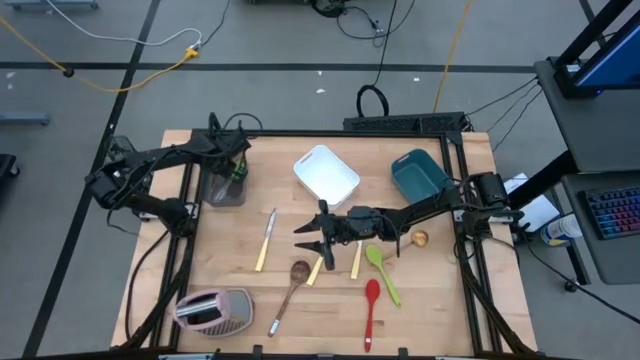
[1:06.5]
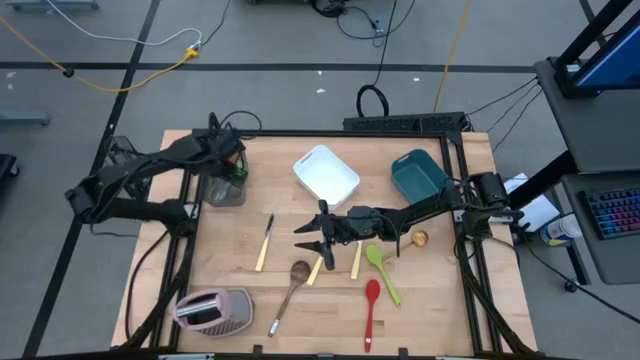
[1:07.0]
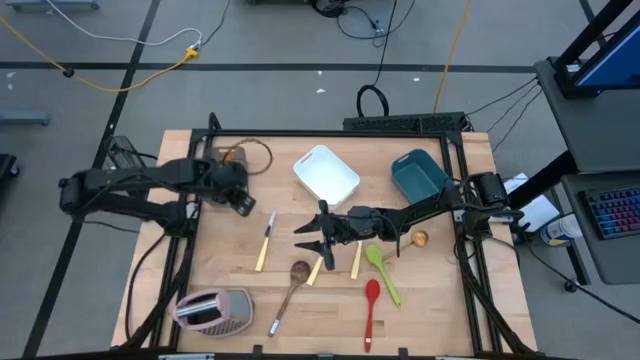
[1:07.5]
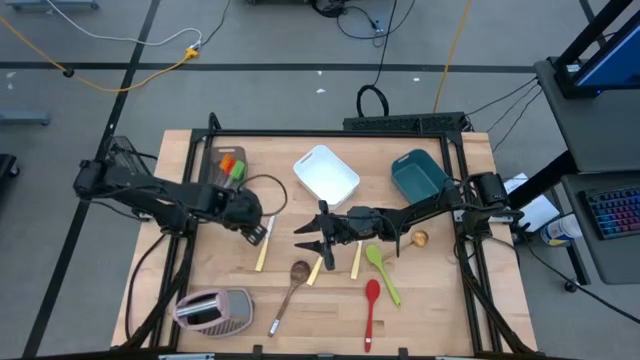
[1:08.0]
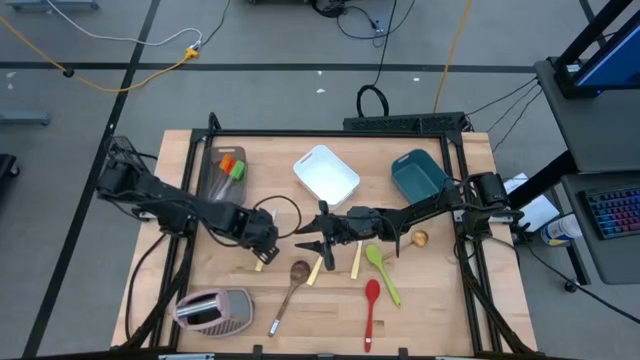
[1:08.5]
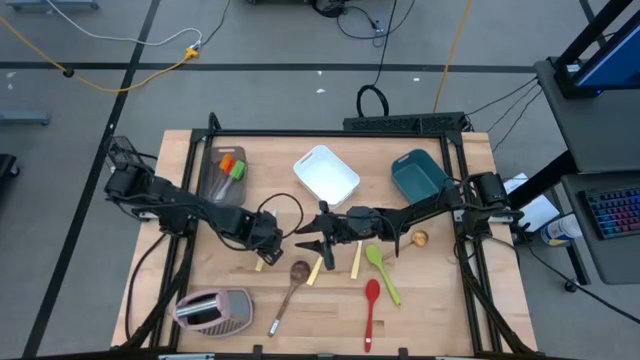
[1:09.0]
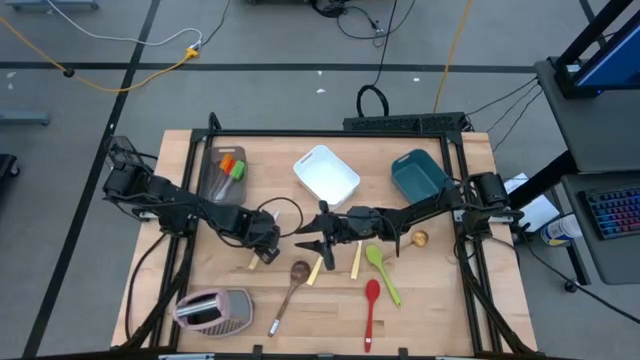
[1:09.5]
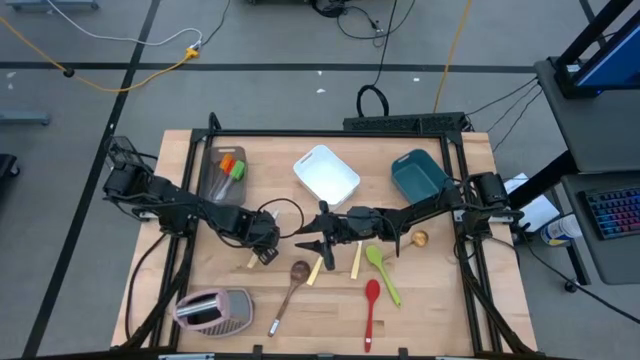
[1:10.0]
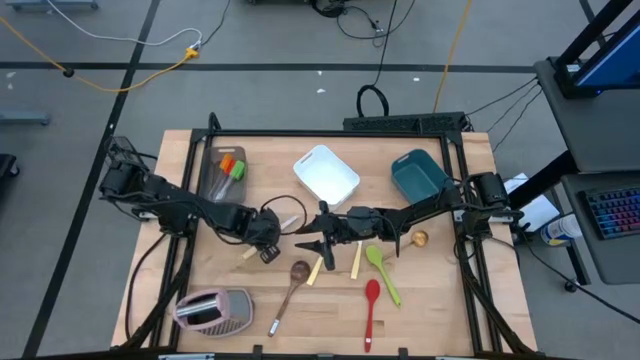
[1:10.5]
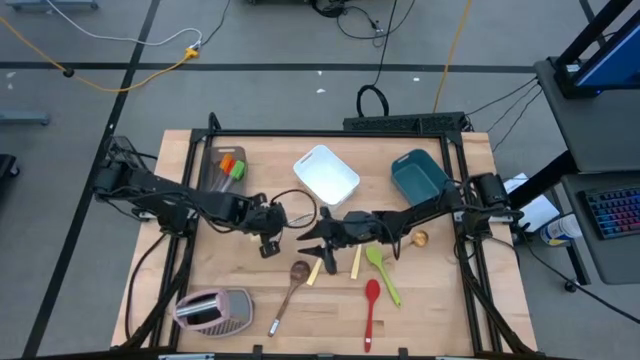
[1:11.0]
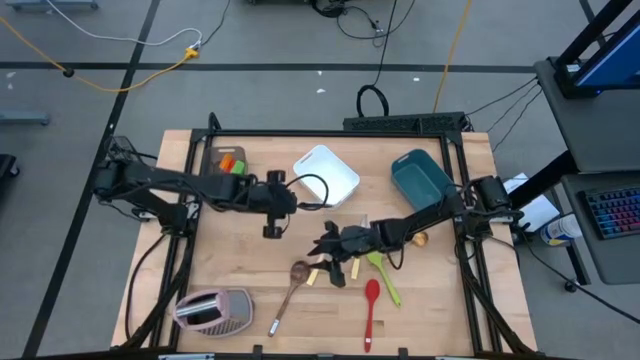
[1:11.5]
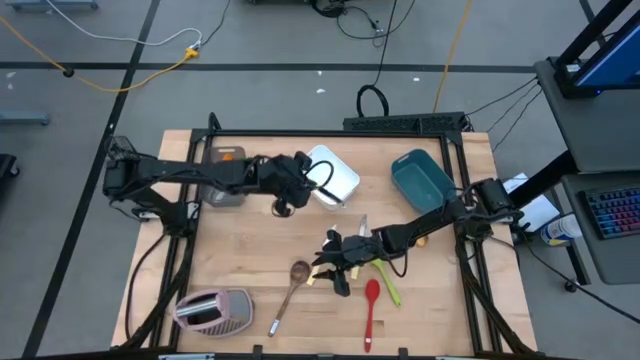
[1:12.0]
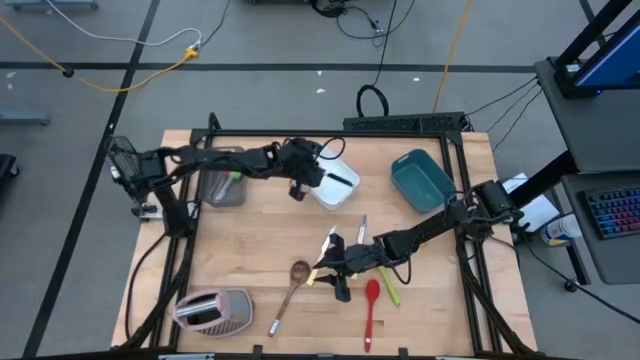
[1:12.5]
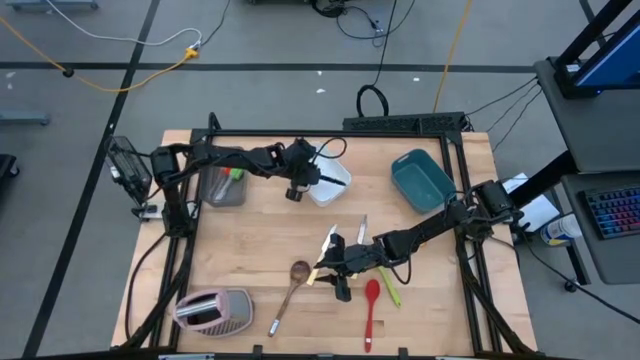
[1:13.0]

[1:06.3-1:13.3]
Task: Pick & Place Kitchen Items
Put the yellow knife into the white bin

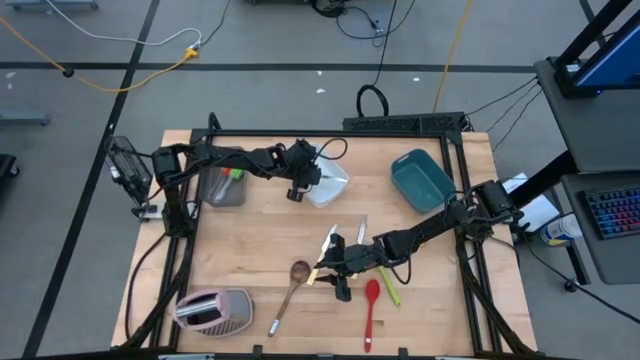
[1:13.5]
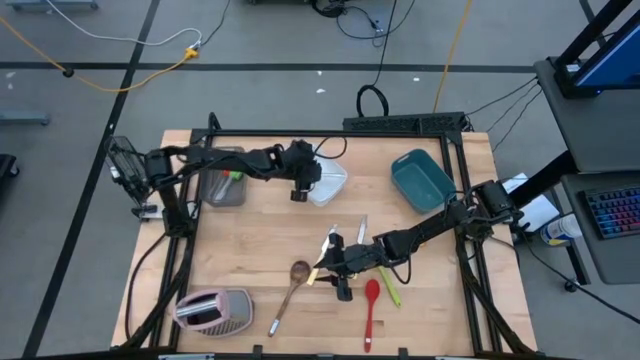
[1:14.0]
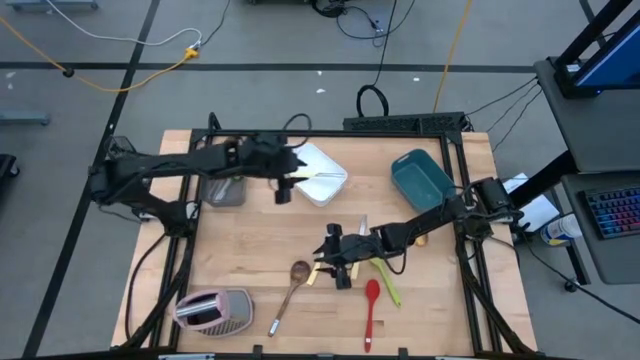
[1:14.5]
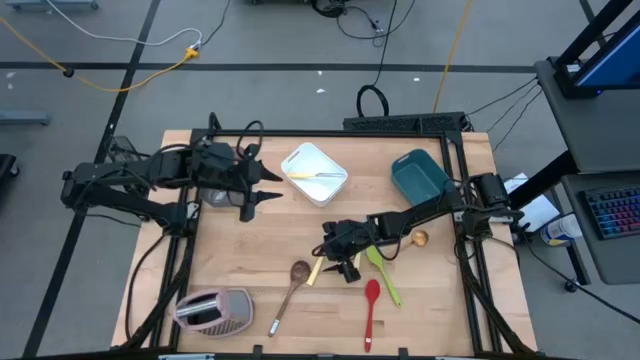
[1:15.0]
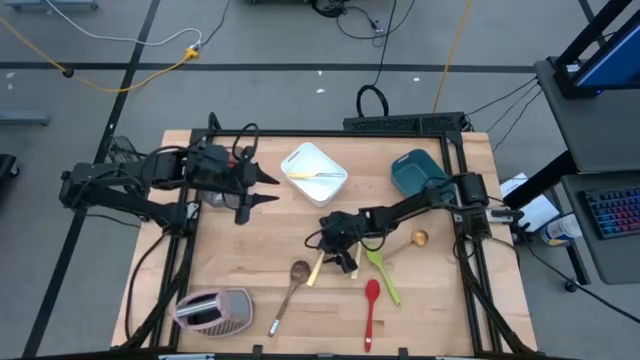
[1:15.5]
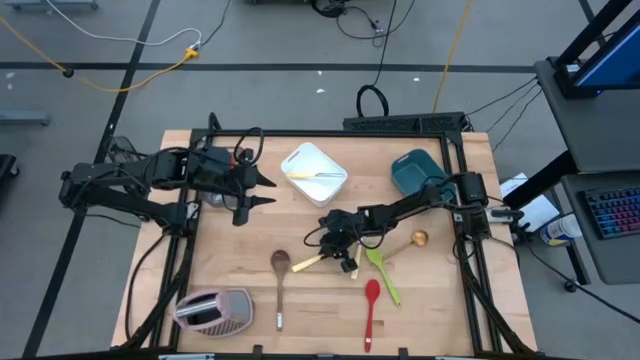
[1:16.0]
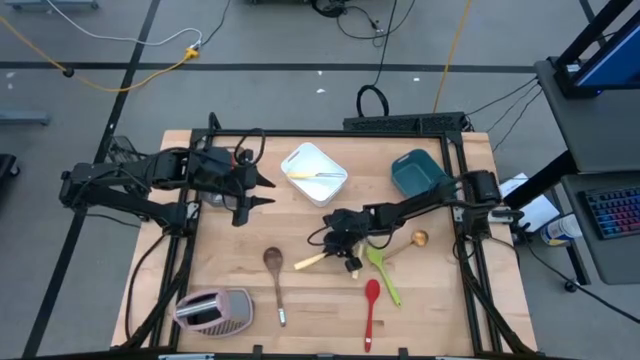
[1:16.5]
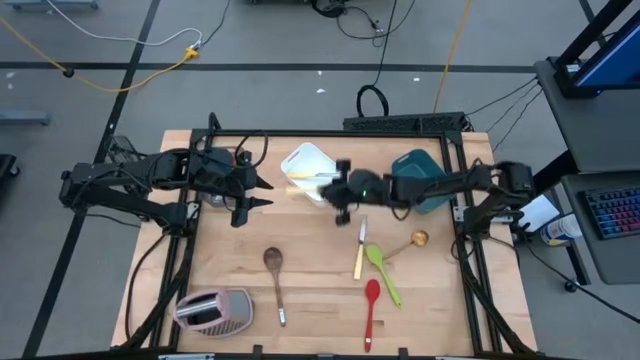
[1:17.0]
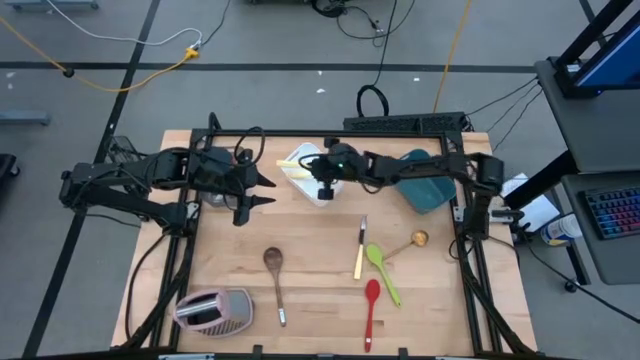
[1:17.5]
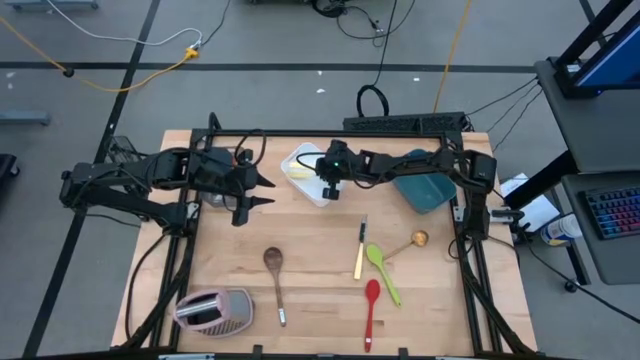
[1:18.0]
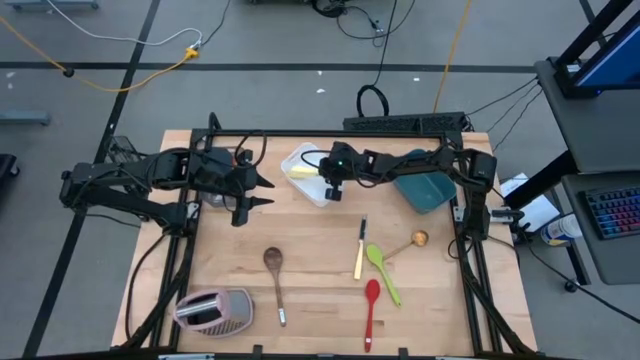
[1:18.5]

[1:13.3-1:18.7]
Put the yellow knife into the white bin

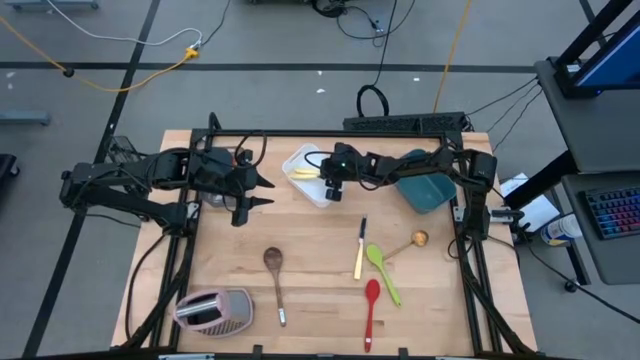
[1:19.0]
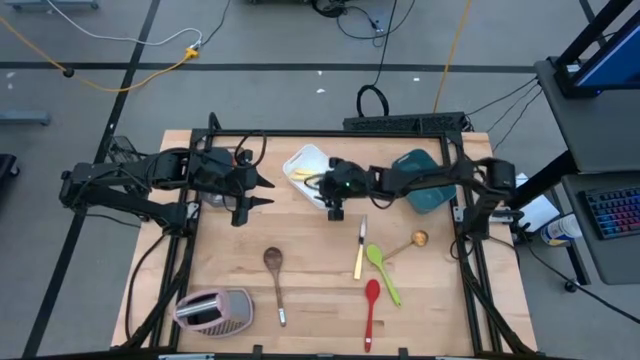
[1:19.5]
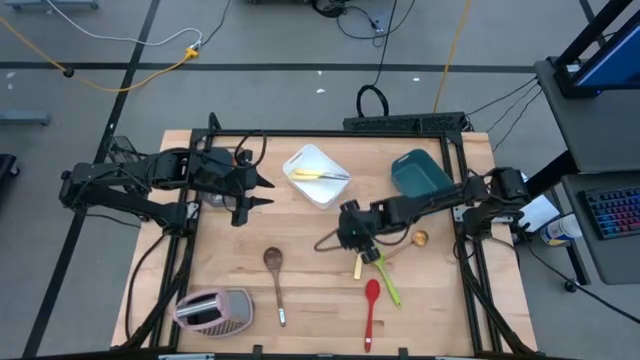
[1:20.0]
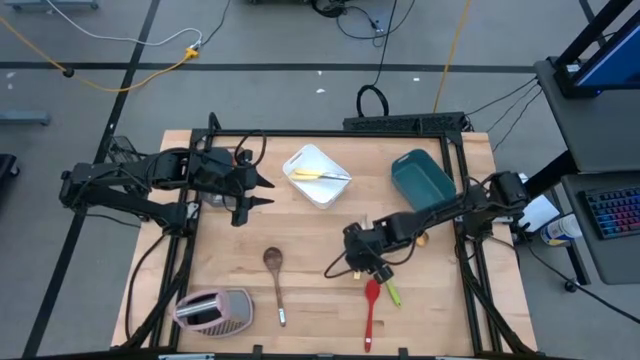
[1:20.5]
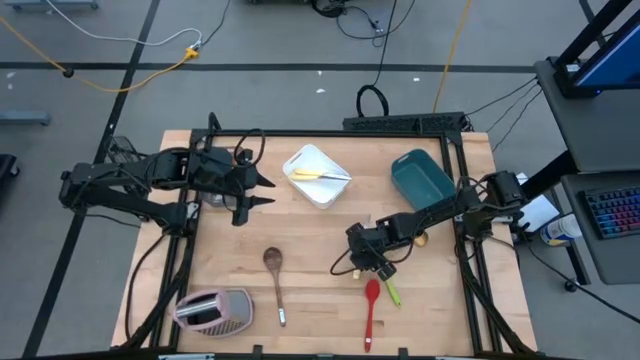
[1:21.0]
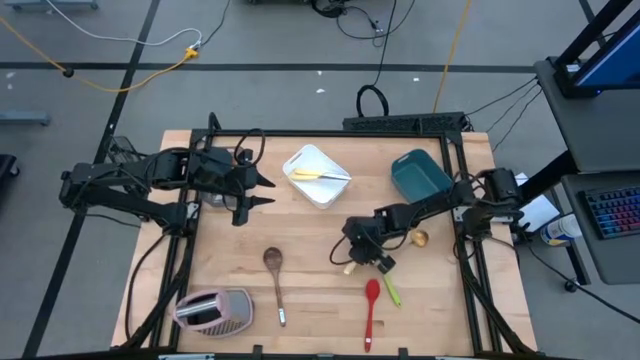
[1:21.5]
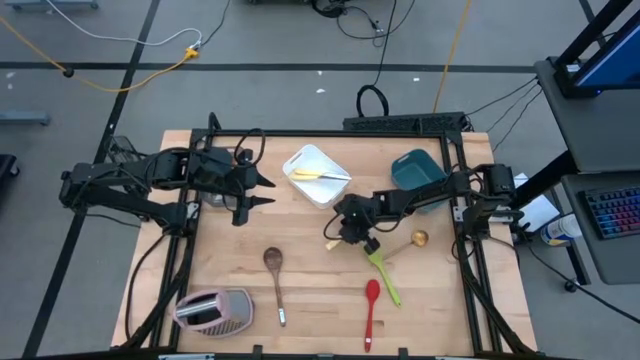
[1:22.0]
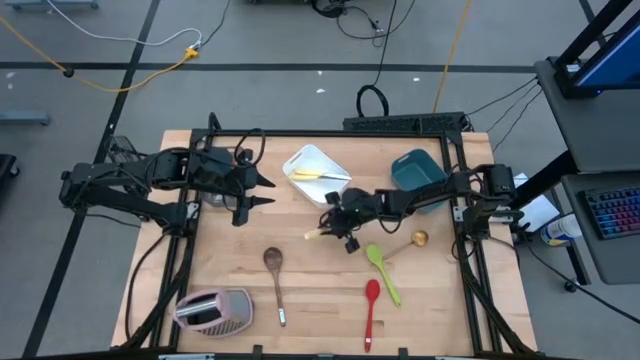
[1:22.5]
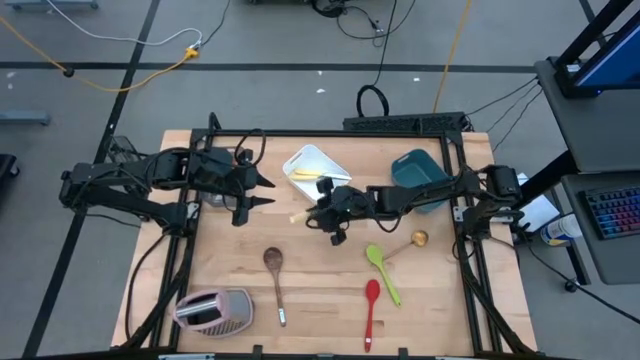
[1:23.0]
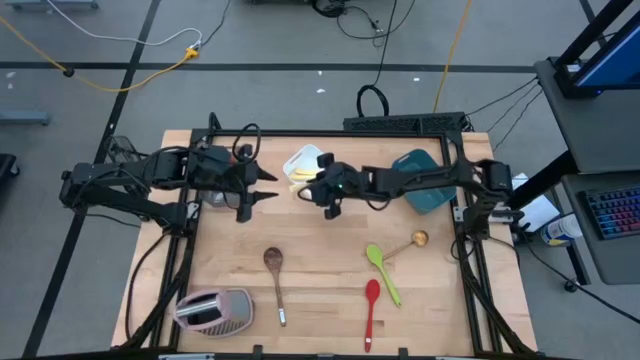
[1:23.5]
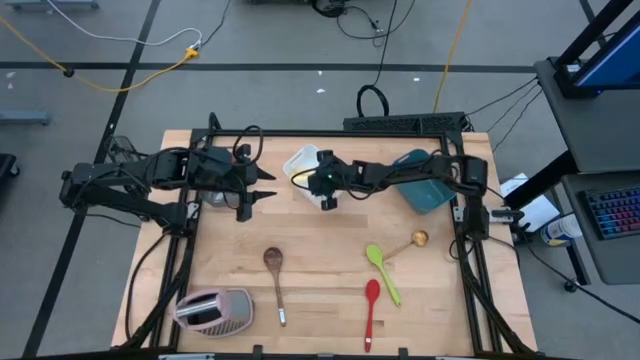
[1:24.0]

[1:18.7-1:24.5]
Put the yellow knife into the white bin

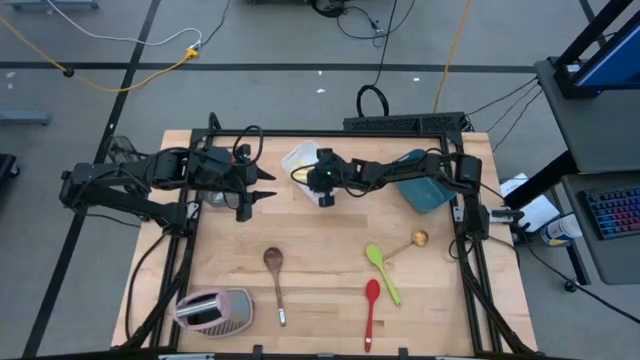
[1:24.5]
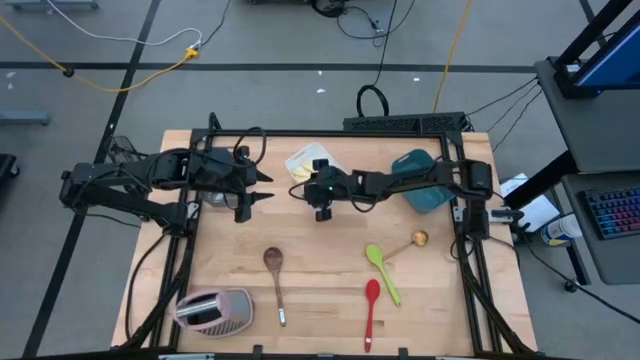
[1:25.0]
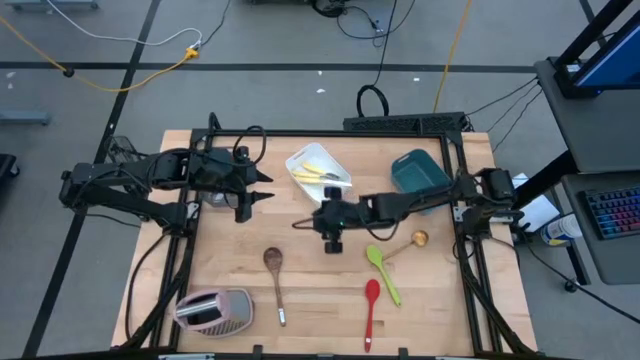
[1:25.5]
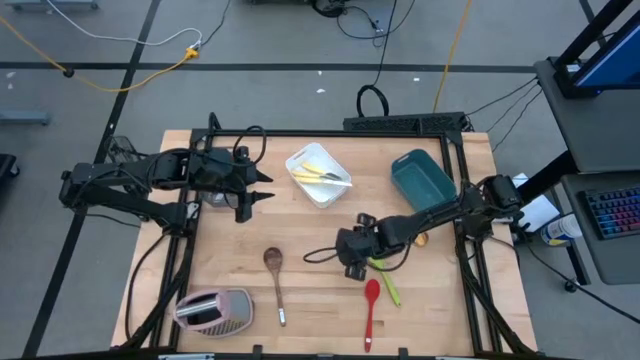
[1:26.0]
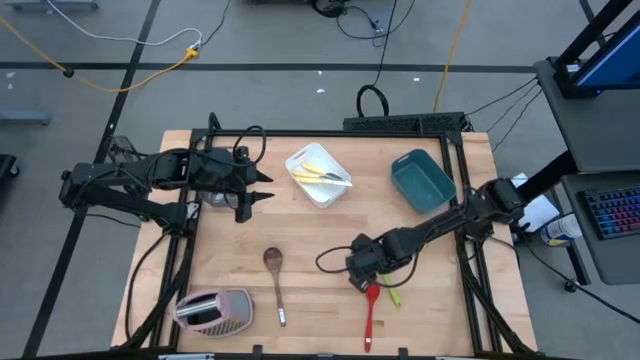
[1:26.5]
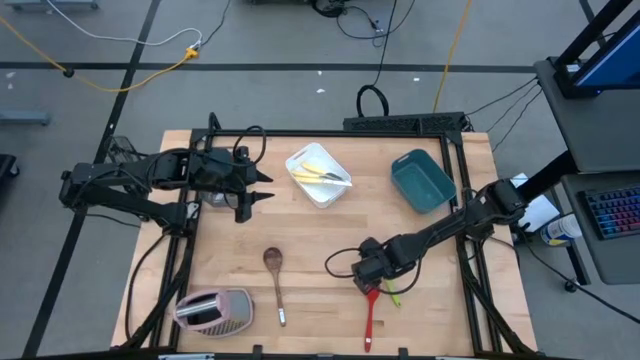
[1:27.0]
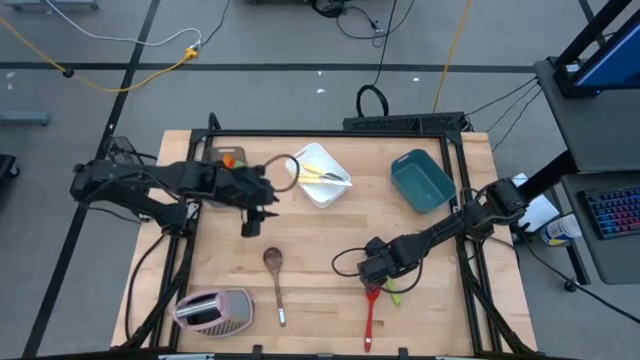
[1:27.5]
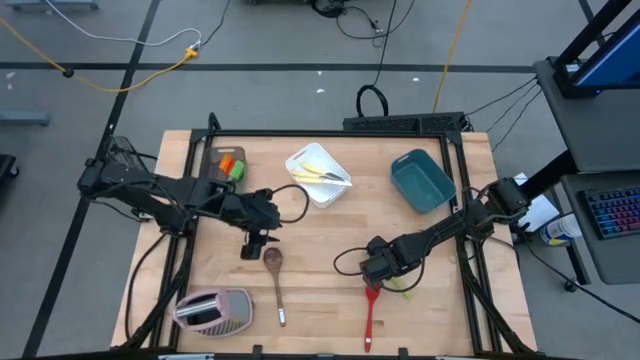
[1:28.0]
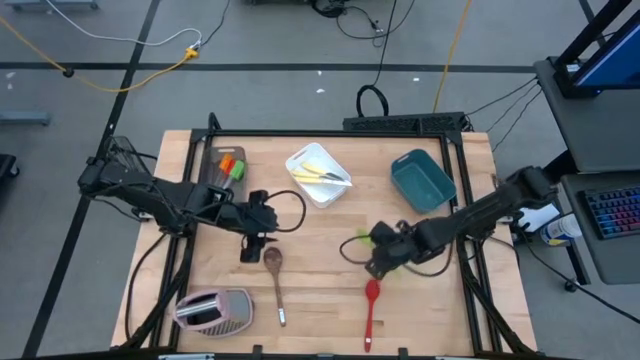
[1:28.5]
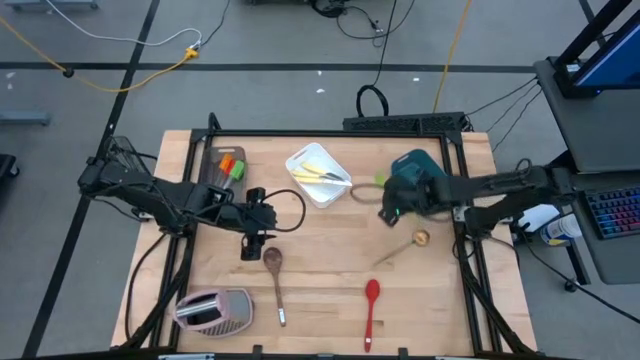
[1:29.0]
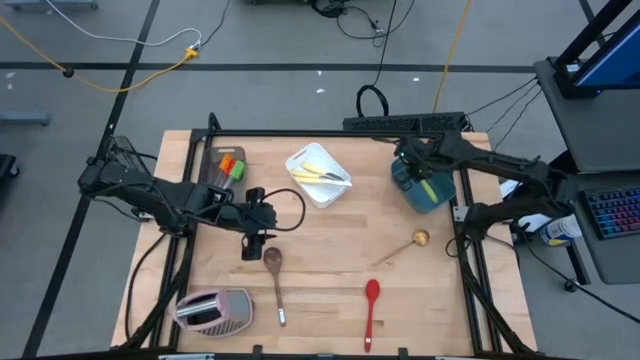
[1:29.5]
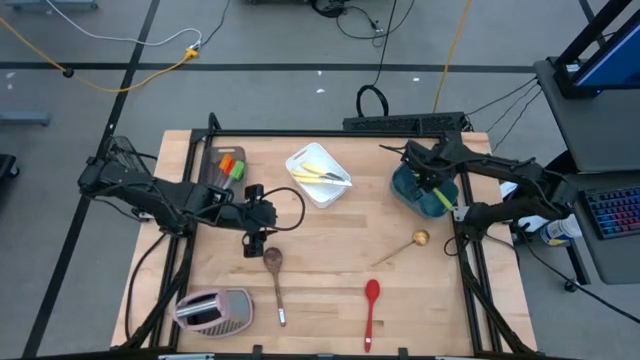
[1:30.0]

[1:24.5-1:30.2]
Put the green spoon into the blue bin
